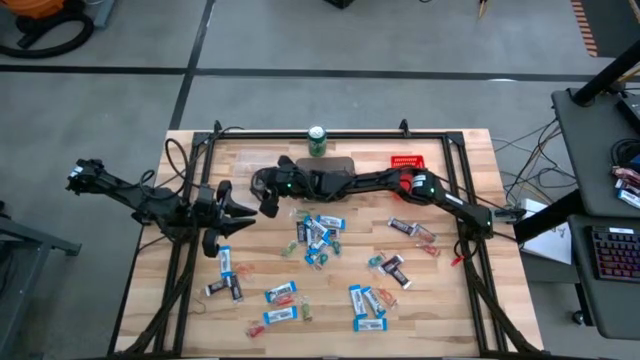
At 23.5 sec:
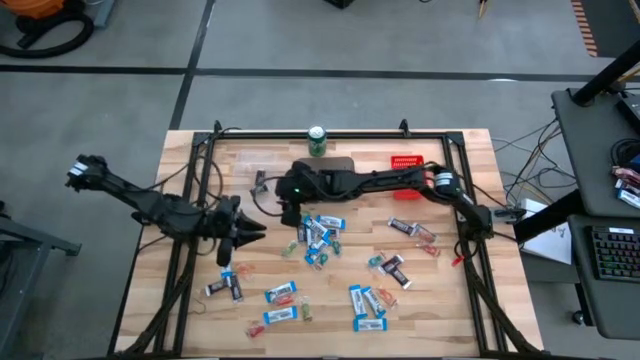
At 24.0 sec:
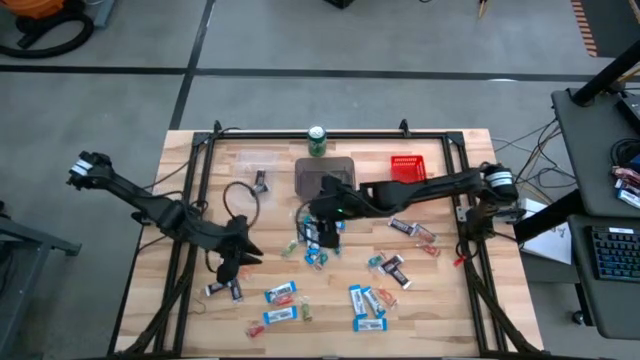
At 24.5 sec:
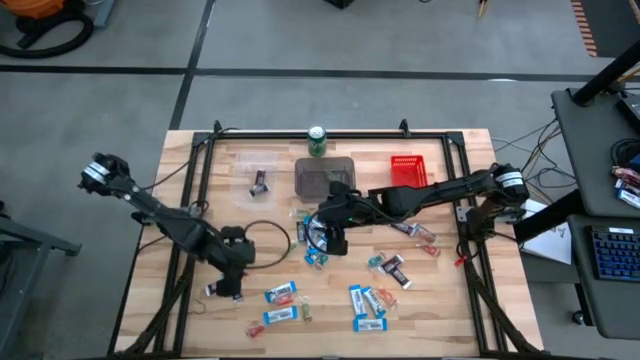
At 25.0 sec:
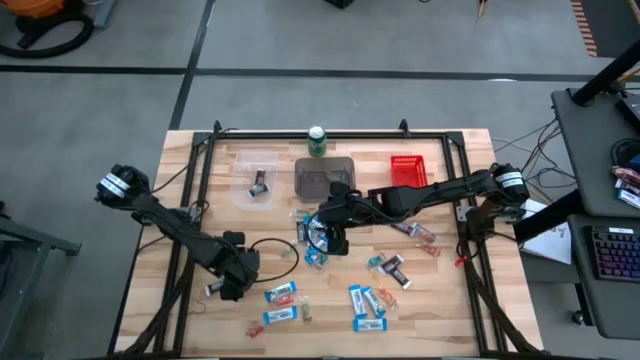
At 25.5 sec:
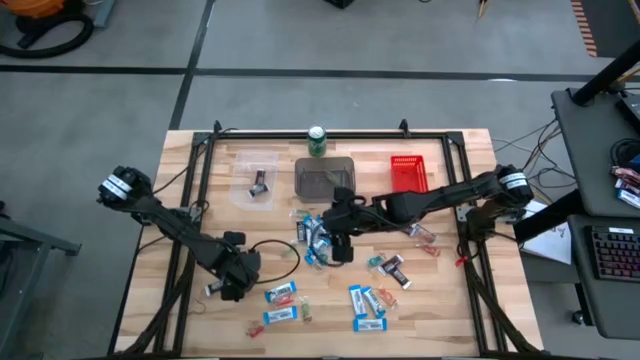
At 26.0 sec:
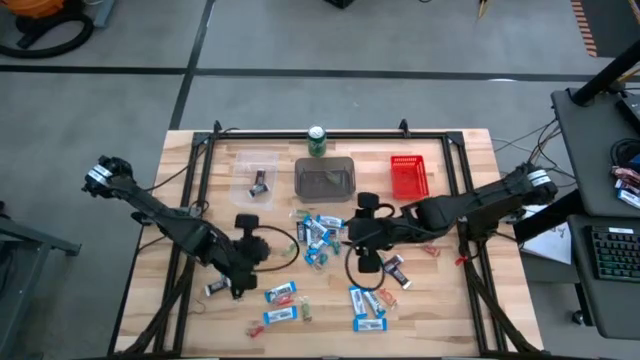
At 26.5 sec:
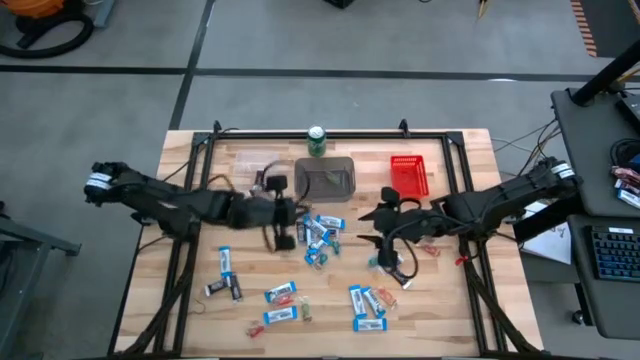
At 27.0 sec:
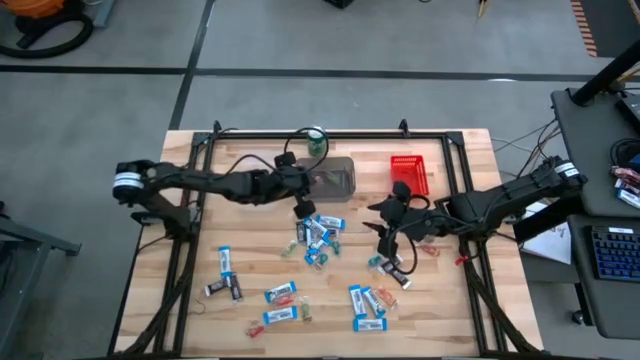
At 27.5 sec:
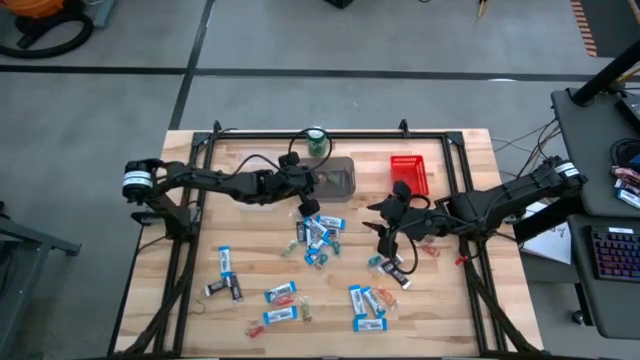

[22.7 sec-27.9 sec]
Task: Organize candy in baskets
Put the orange gummy into the black bin

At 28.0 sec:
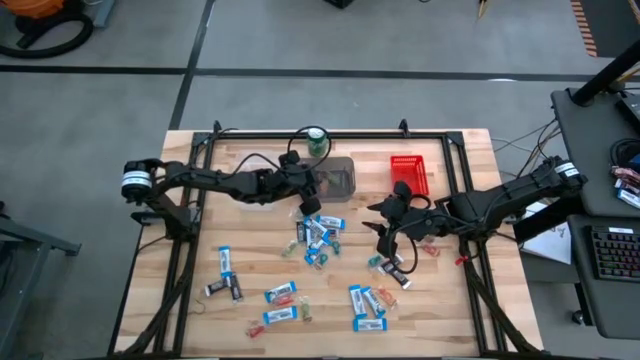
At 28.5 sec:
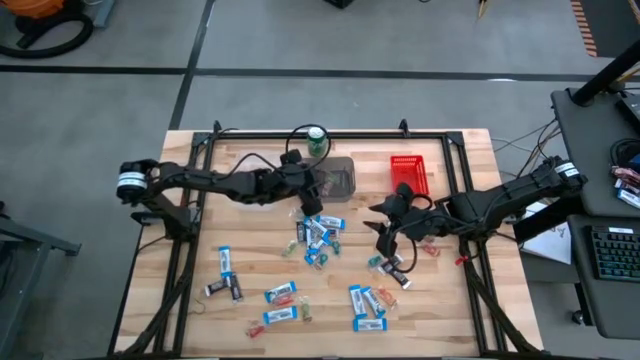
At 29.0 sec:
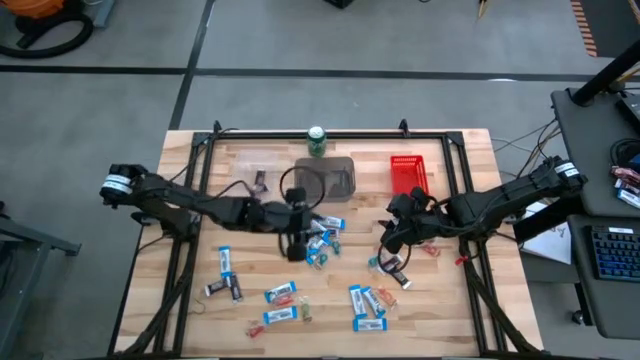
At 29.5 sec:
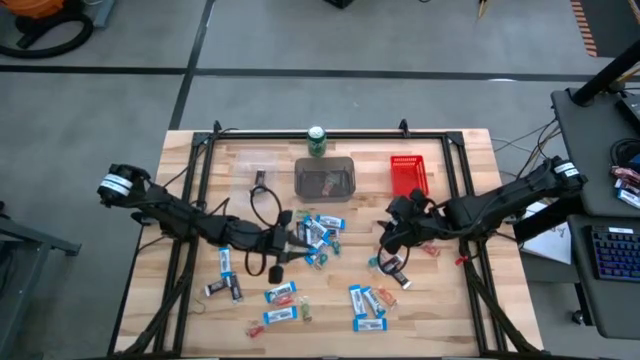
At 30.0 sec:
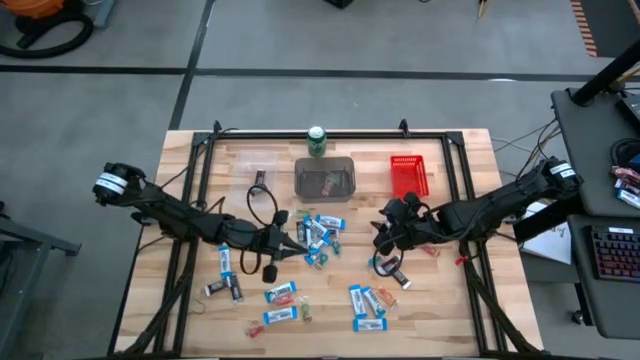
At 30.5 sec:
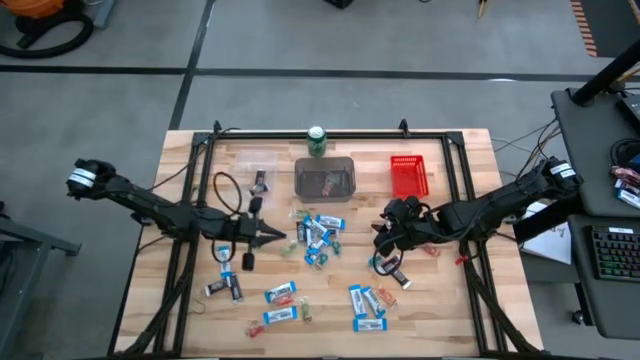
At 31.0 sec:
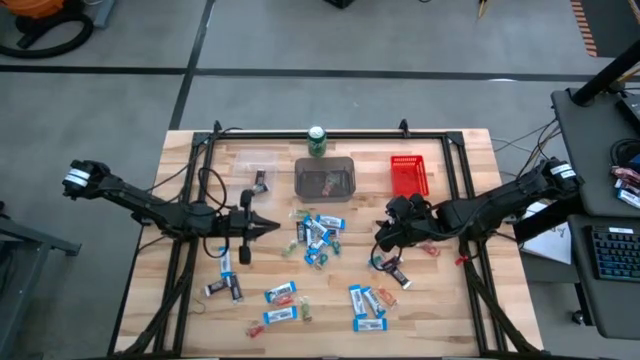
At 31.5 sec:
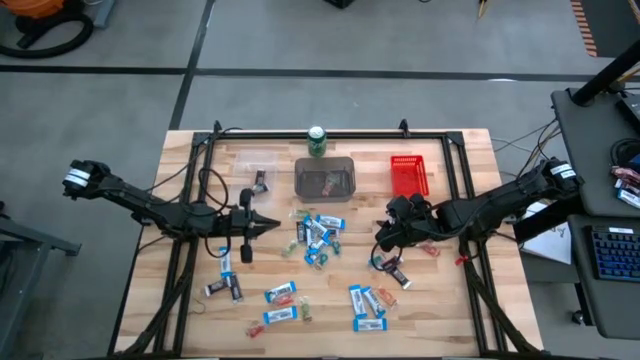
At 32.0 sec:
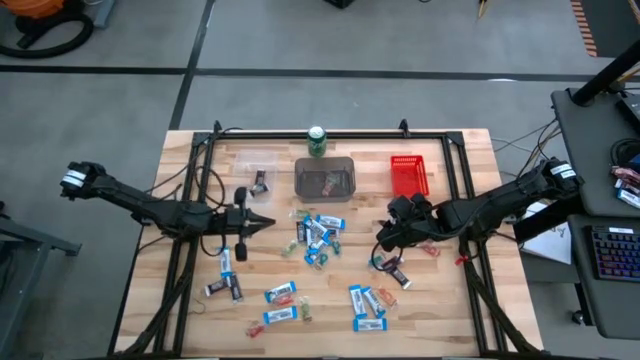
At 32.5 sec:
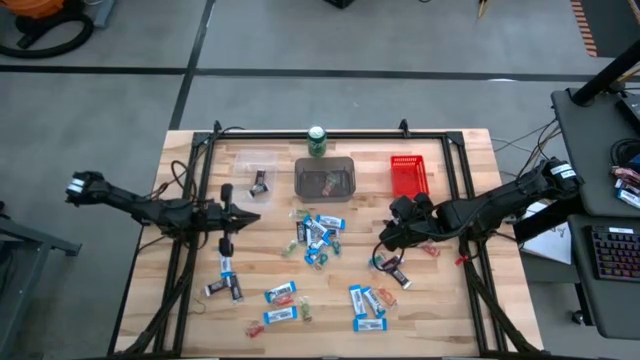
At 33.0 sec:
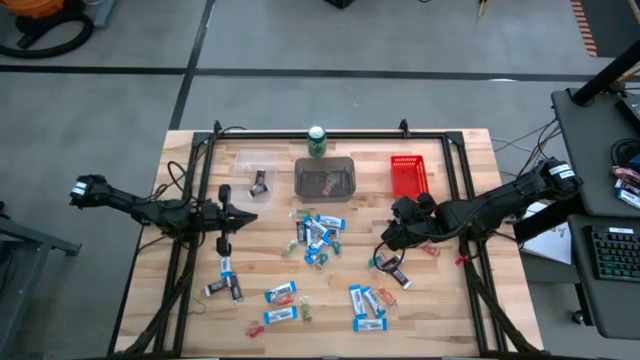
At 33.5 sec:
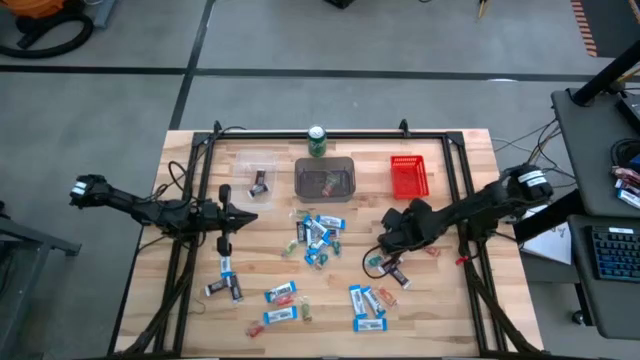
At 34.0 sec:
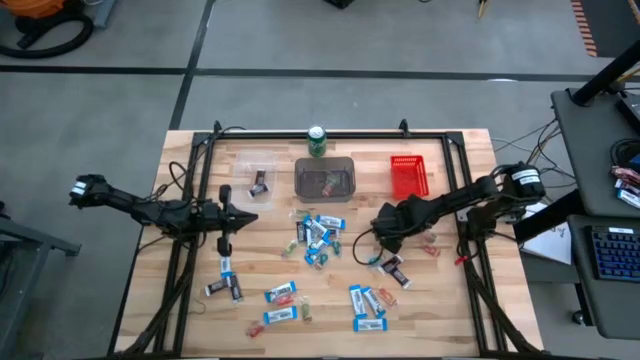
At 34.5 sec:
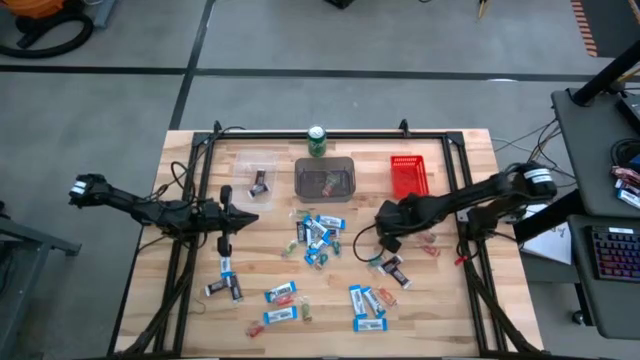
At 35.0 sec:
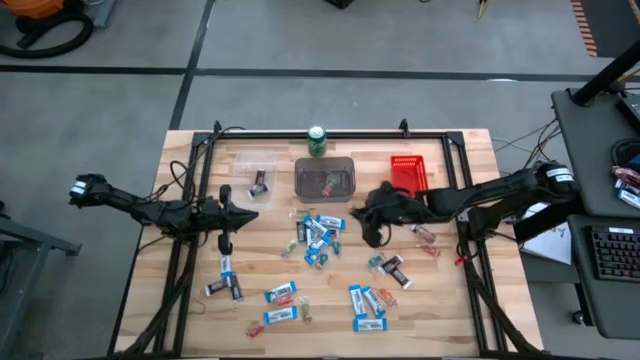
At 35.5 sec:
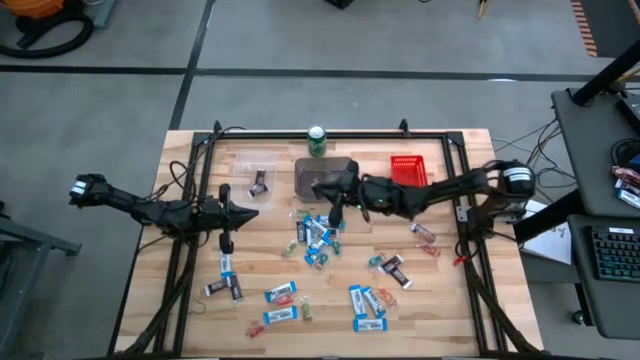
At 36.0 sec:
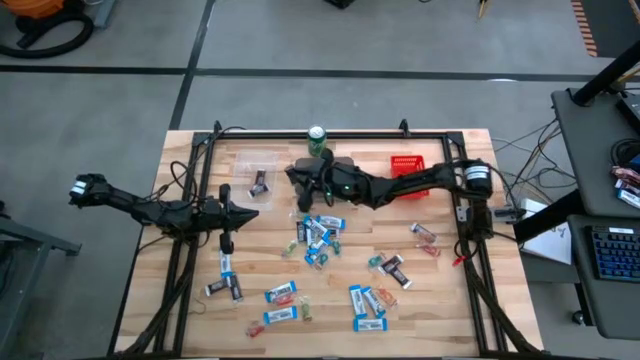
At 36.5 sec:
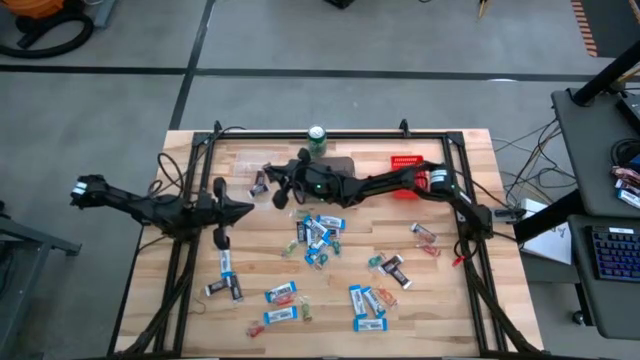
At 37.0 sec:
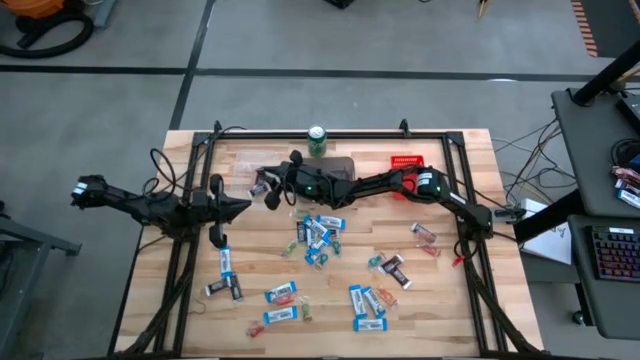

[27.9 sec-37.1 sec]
Put the brown chocolate bar into the transparent bin

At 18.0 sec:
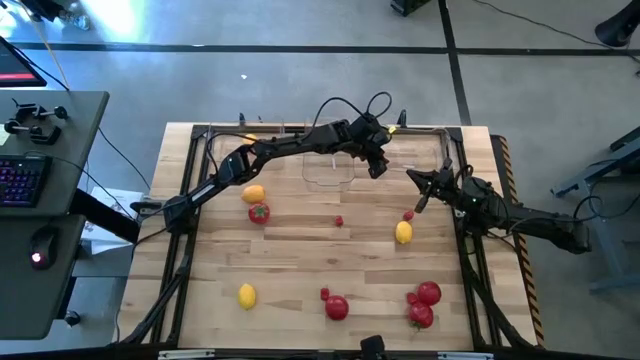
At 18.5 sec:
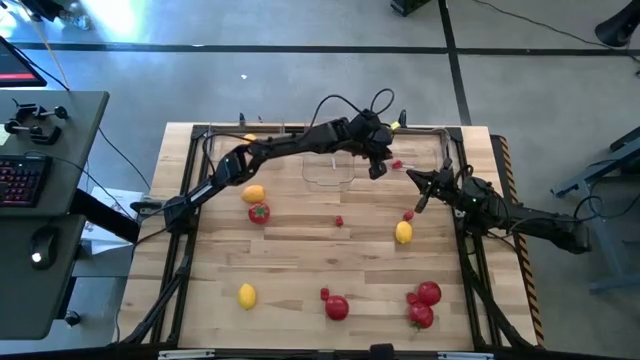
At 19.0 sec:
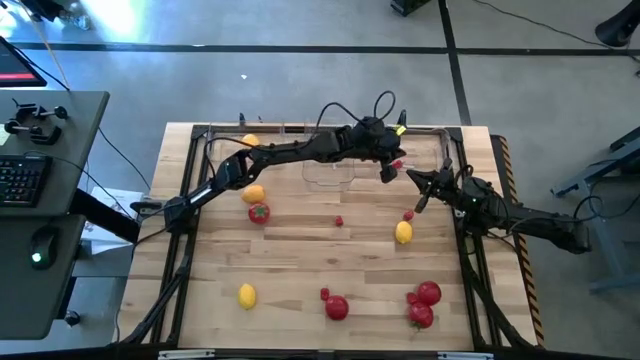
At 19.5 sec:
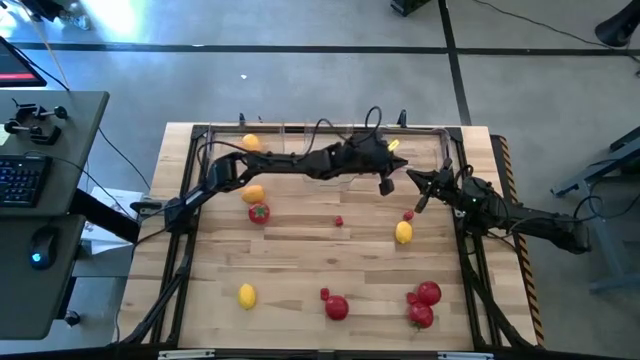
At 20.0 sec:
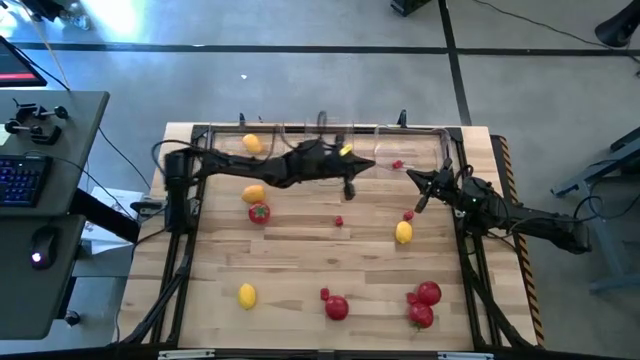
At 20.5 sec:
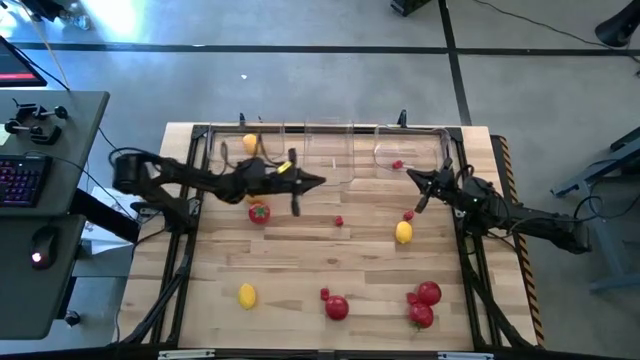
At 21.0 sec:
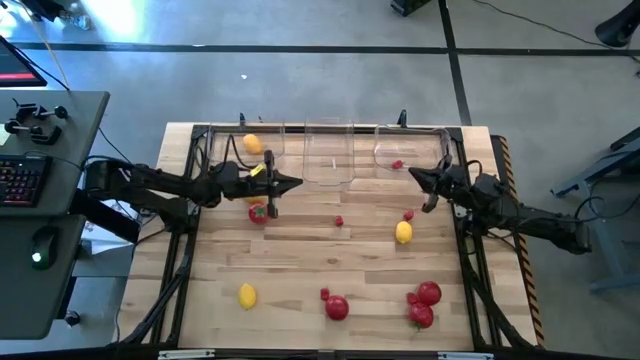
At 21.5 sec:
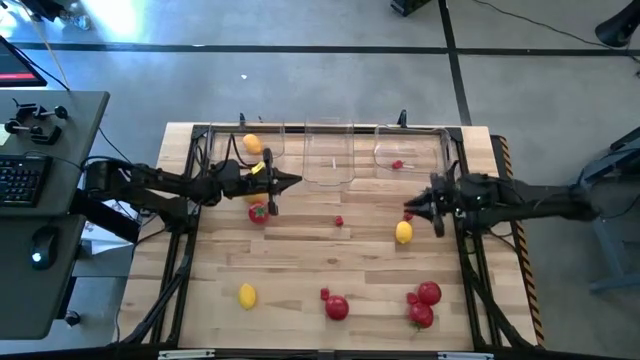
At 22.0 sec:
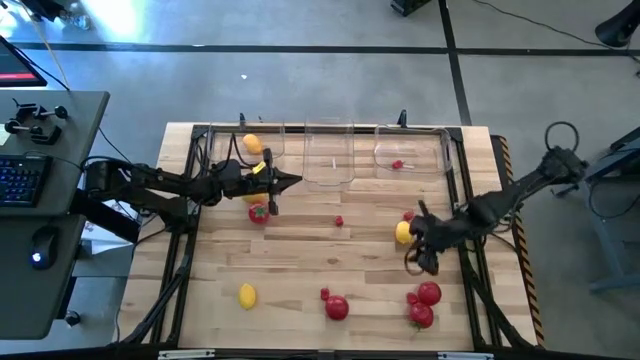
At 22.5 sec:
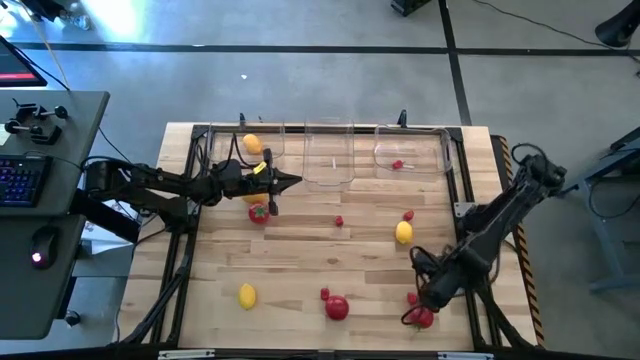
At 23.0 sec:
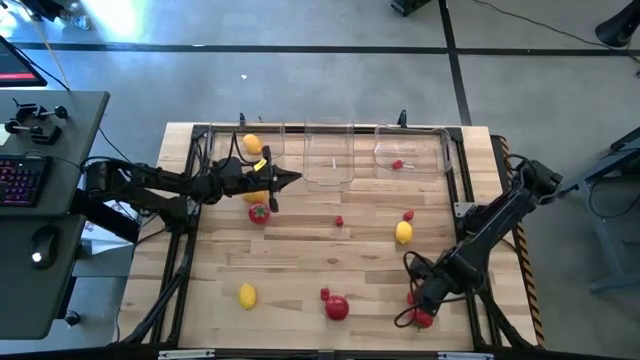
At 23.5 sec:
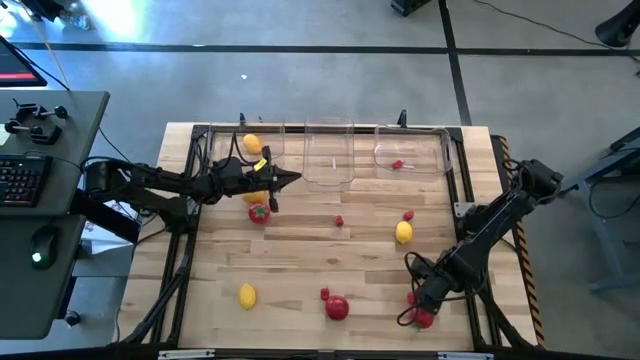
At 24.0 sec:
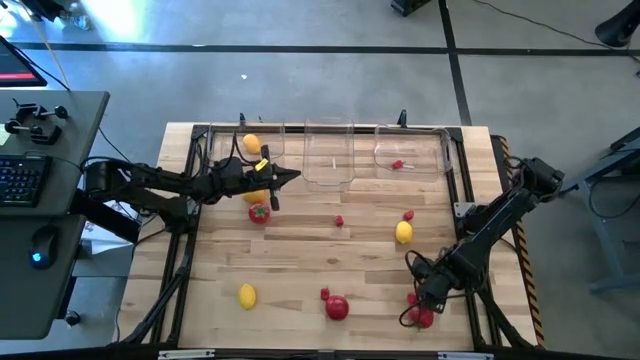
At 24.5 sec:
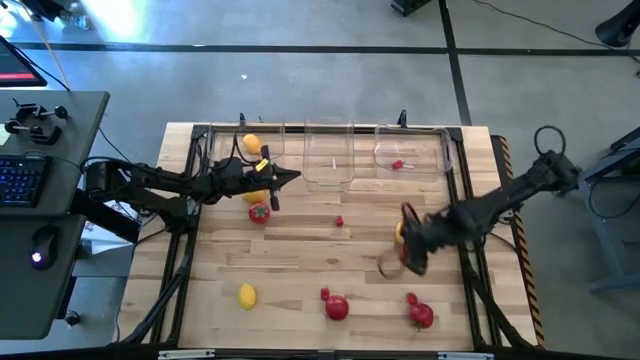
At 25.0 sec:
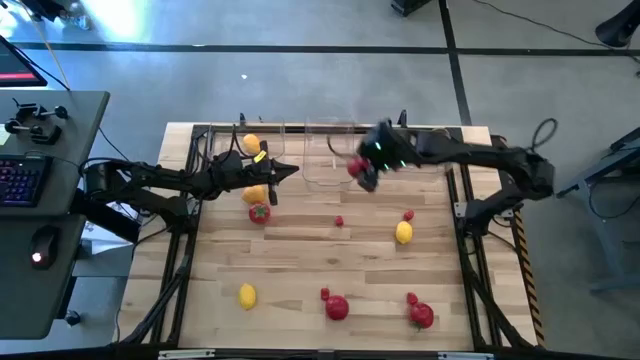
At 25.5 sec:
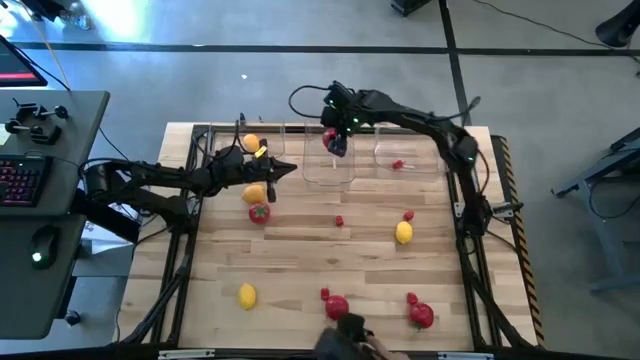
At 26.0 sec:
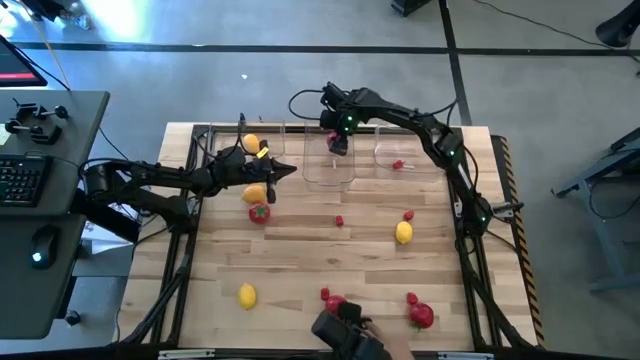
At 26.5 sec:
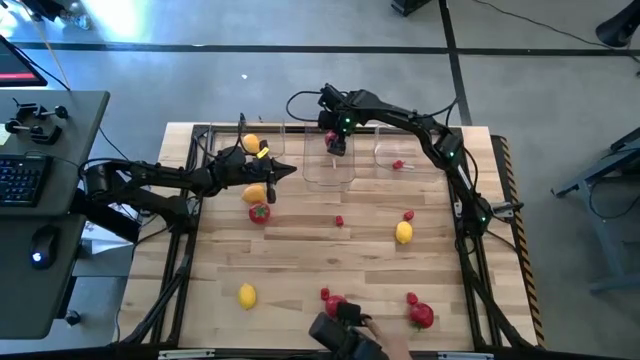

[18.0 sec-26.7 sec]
Task: Sort produce into baskets
Put the tomato into the middle transparent bin
